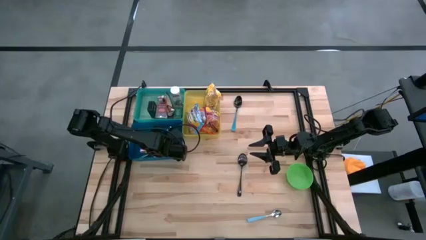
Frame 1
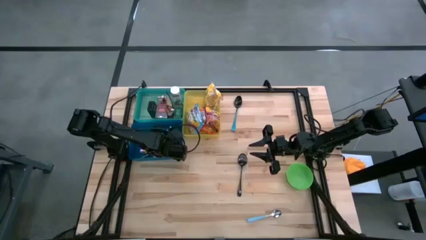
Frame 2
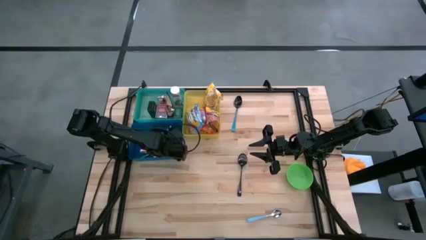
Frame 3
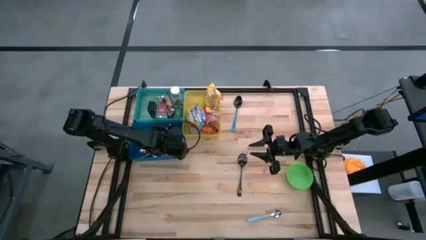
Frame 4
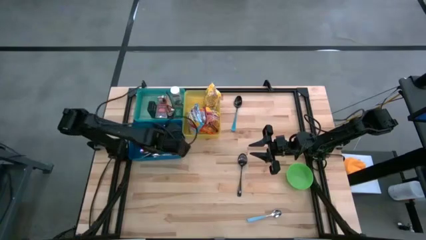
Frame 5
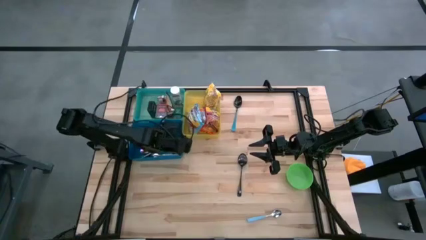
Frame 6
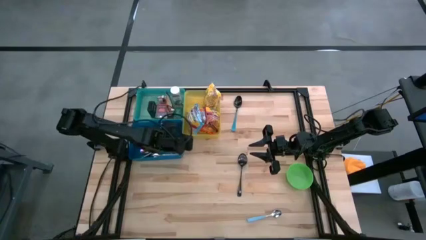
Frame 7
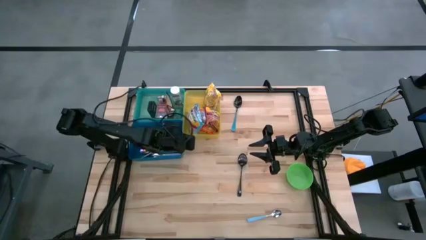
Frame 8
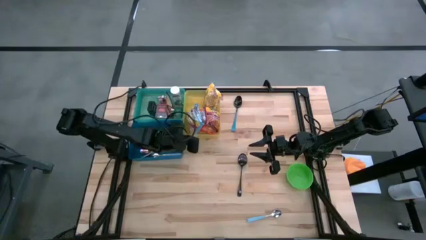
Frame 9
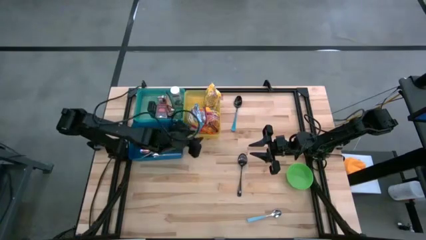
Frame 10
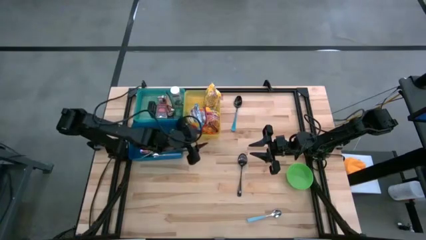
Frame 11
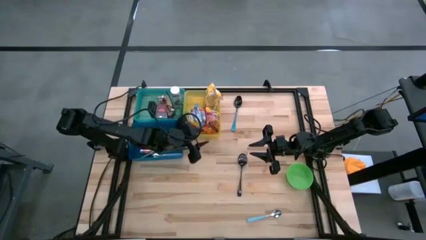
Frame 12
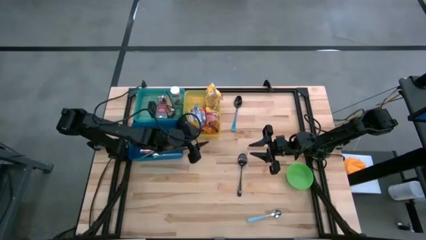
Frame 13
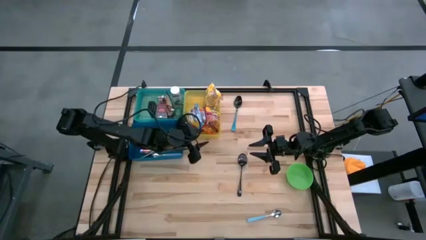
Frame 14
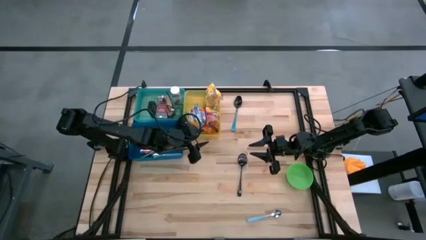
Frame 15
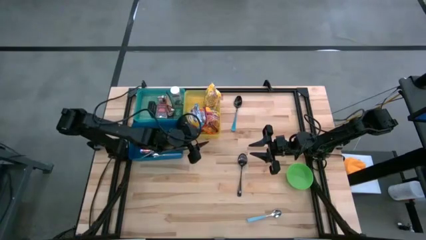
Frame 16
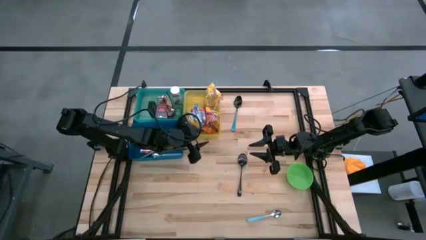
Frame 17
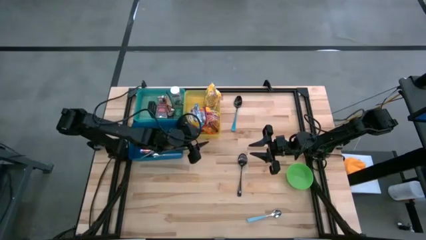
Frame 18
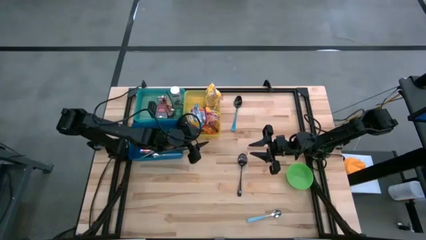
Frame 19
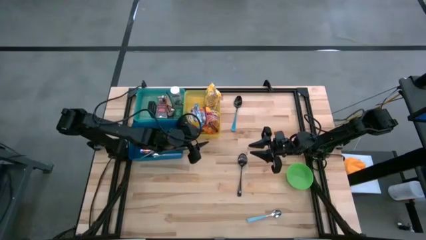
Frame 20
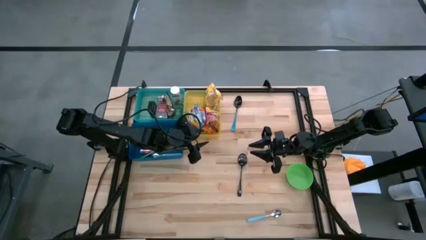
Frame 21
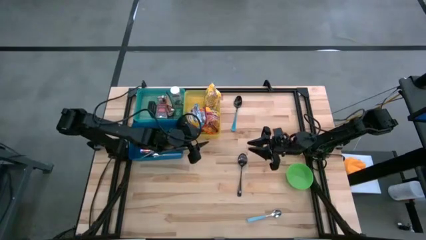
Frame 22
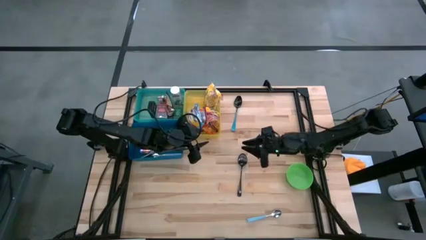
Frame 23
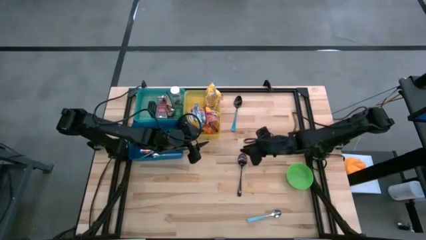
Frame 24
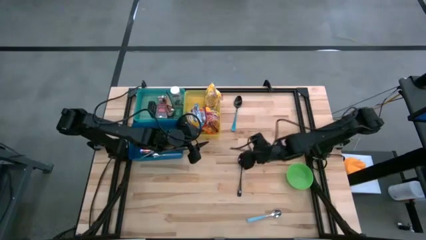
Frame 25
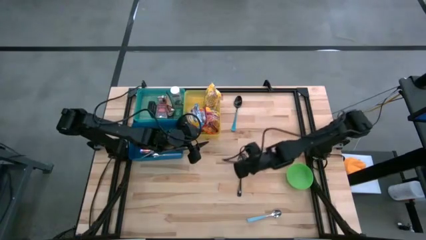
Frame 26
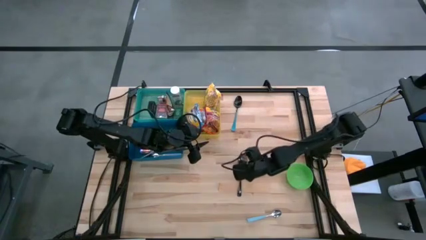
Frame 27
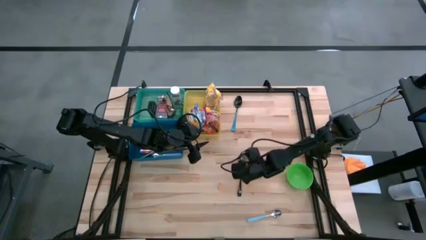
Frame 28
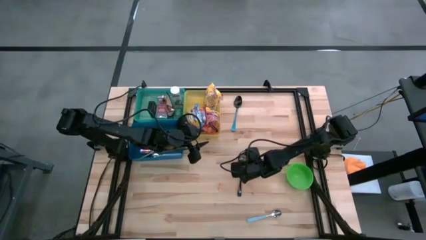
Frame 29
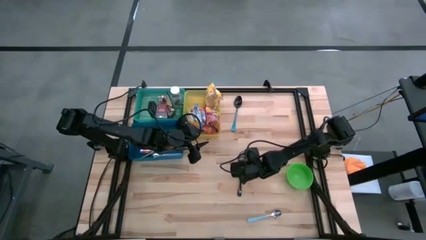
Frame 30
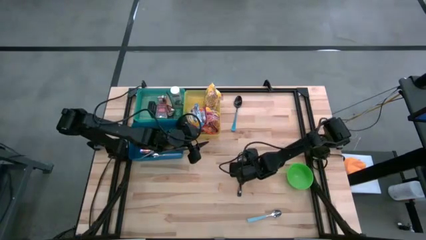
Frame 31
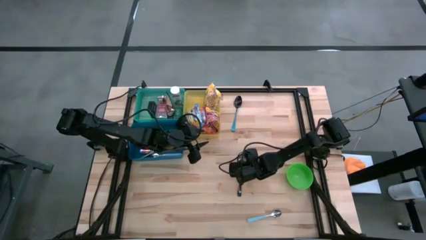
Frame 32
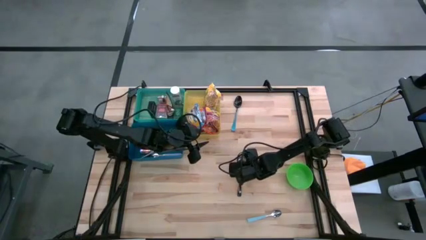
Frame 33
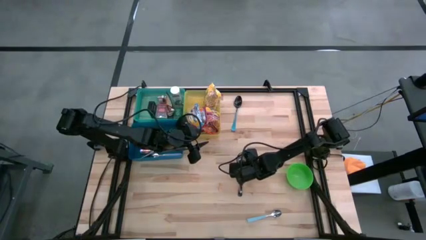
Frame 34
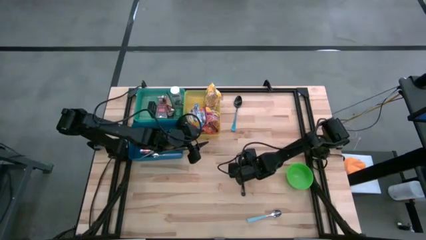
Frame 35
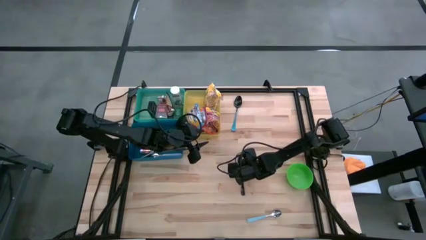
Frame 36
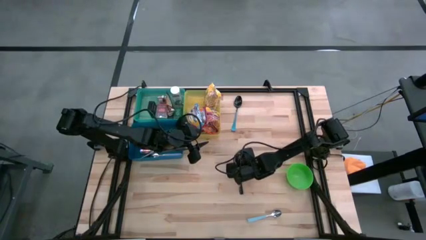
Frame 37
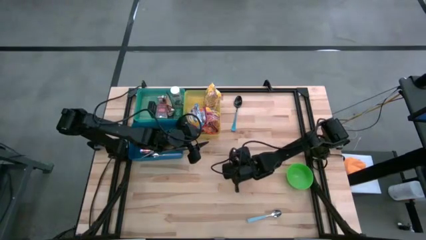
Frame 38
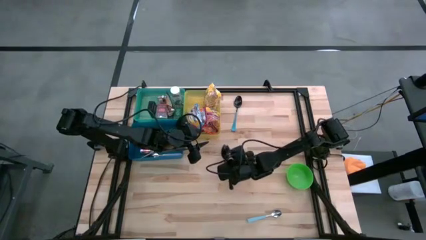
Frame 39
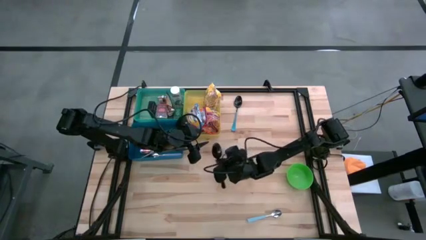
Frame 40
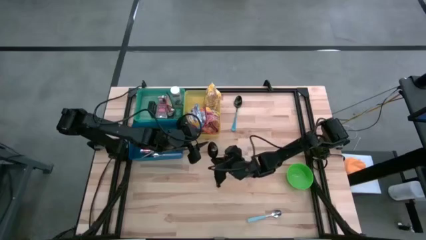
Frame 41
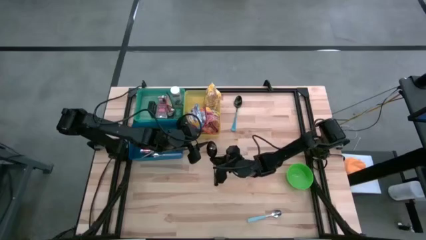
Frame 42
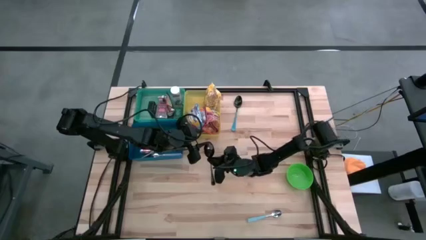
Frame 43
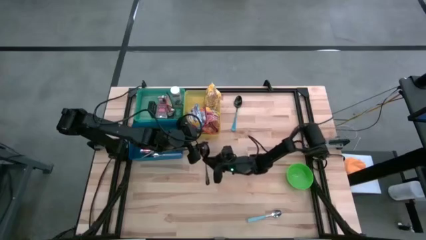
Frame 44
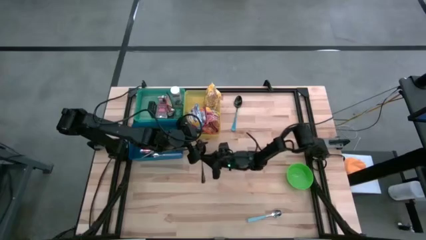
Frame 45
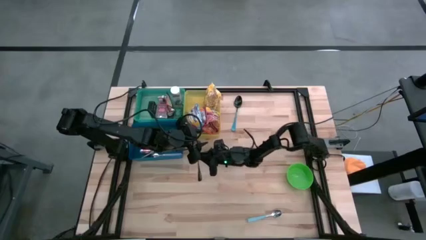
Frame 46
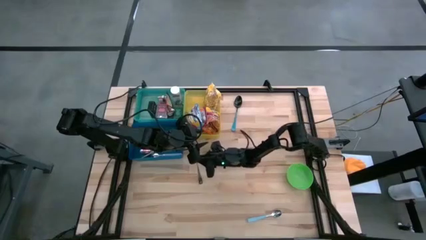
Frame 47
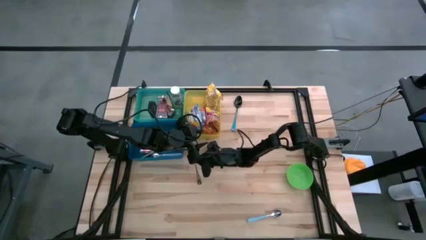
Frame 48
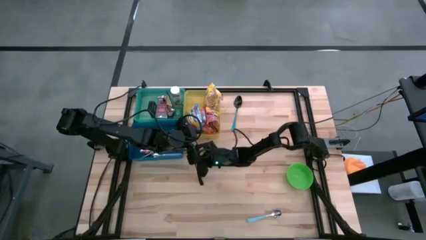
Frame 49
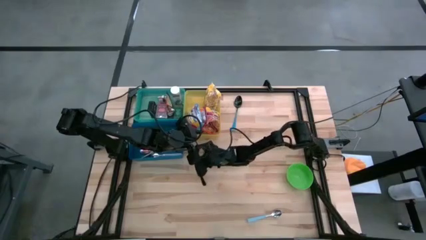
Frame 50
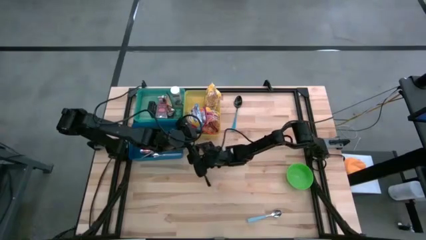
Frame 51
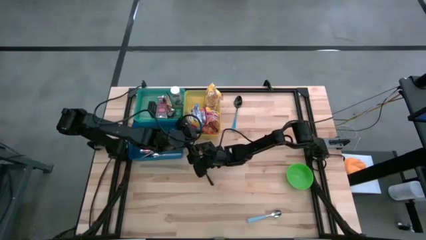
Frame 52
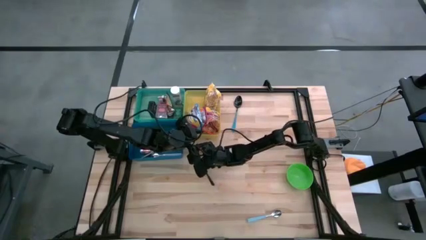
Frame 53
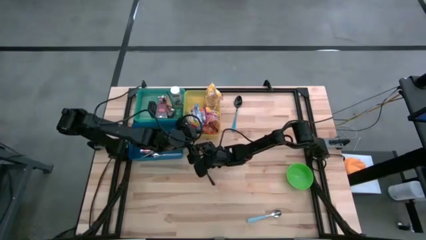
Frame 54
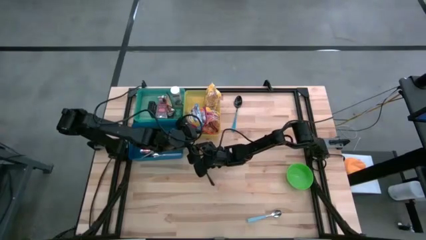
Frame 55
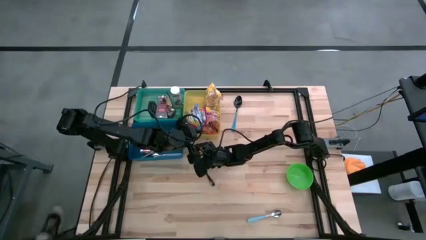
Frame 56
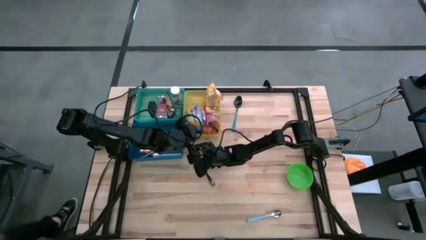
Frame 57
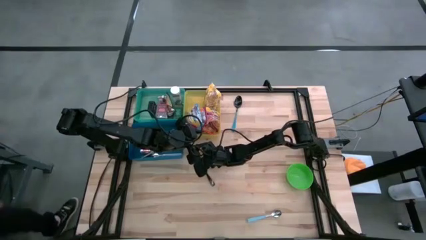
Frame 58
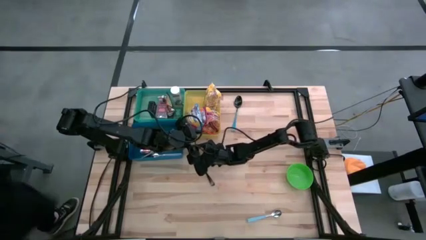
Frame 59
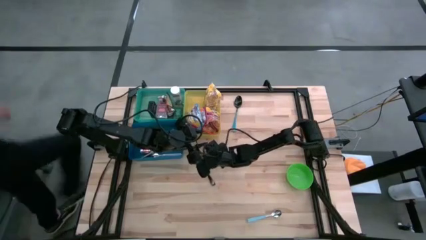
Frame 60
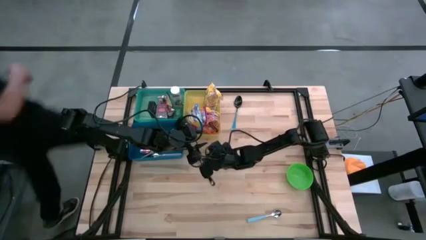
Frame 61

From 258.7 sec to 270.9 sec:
Put the black spoon into the blue bin
